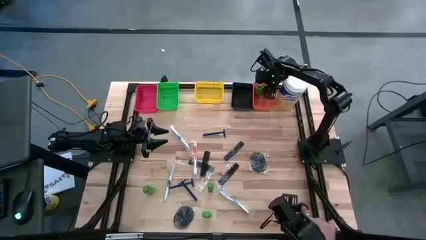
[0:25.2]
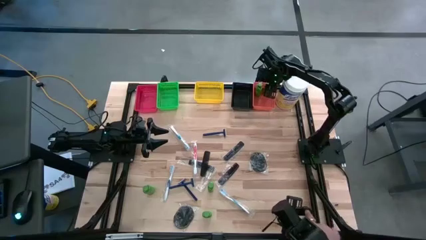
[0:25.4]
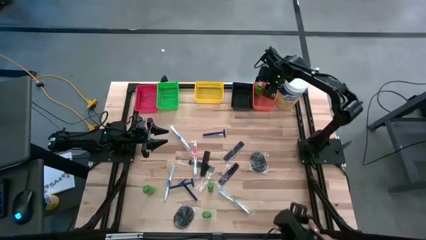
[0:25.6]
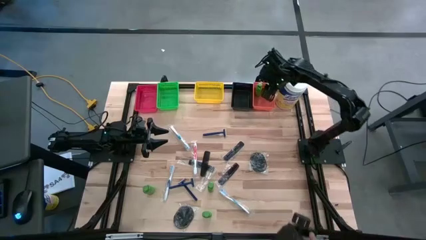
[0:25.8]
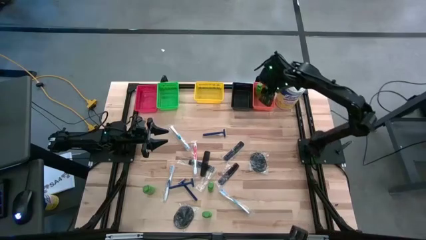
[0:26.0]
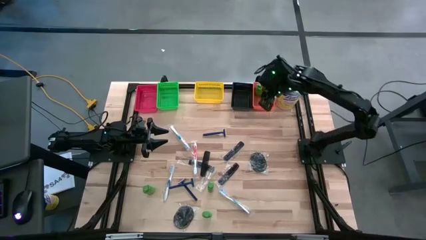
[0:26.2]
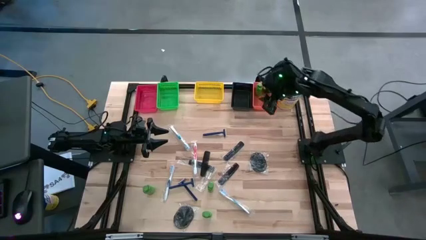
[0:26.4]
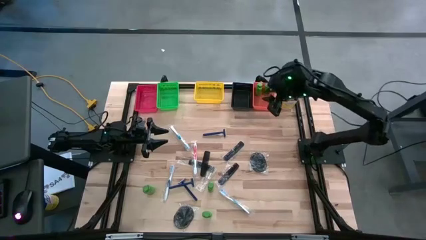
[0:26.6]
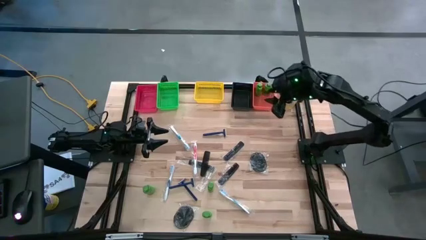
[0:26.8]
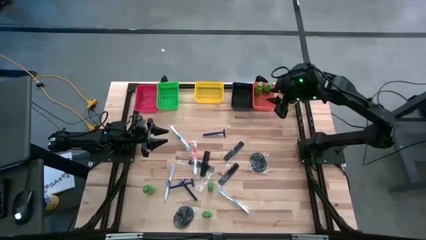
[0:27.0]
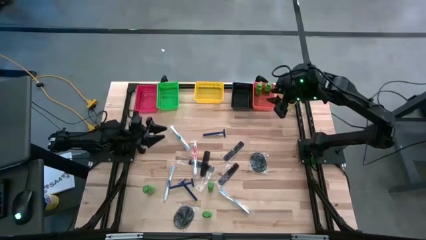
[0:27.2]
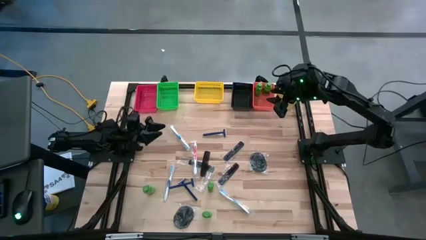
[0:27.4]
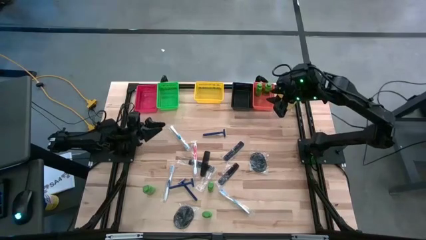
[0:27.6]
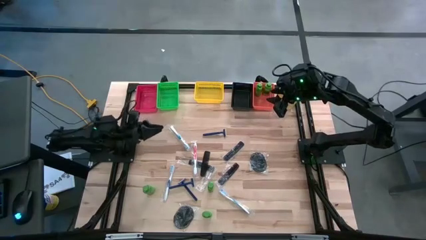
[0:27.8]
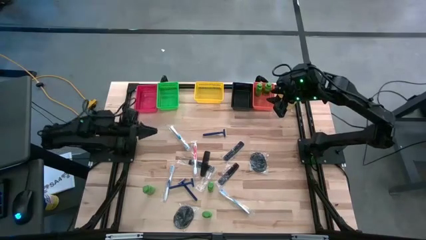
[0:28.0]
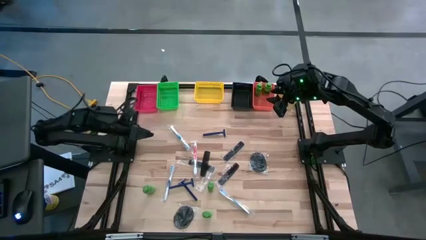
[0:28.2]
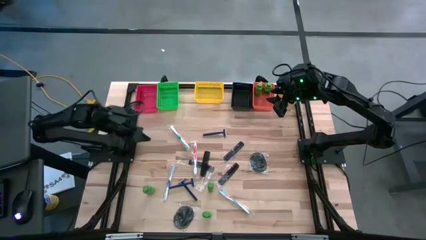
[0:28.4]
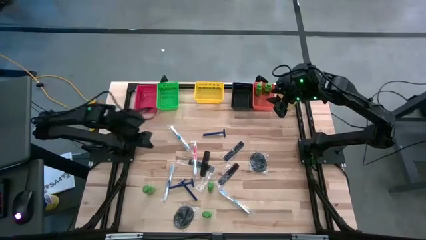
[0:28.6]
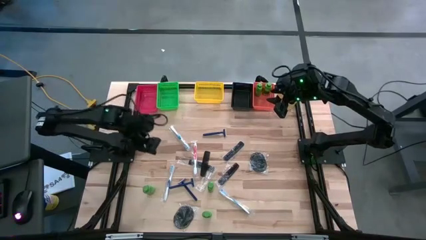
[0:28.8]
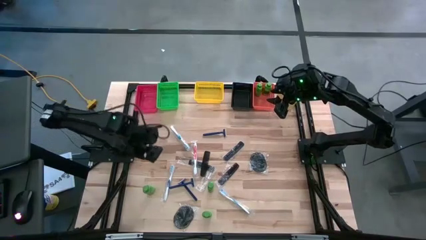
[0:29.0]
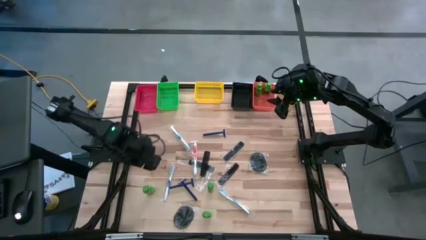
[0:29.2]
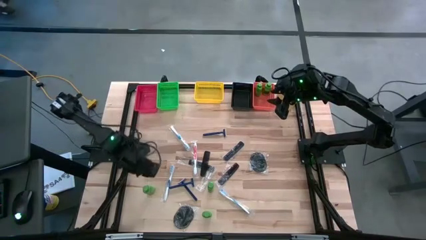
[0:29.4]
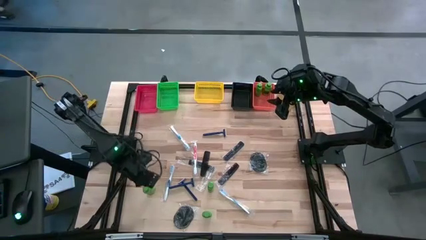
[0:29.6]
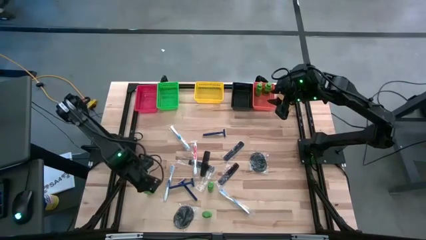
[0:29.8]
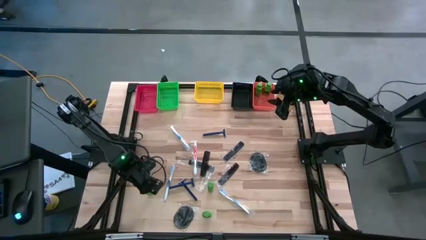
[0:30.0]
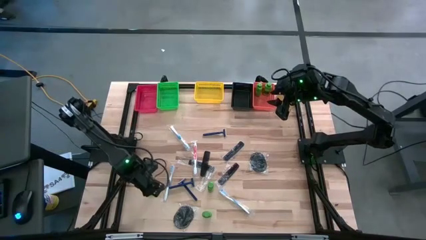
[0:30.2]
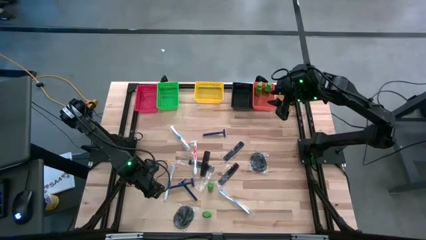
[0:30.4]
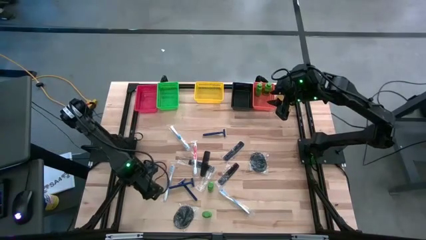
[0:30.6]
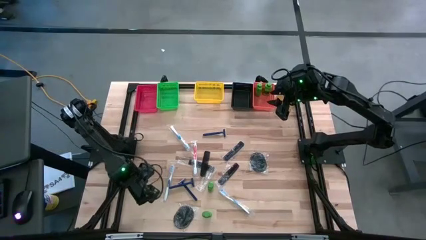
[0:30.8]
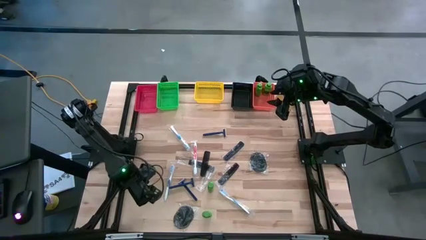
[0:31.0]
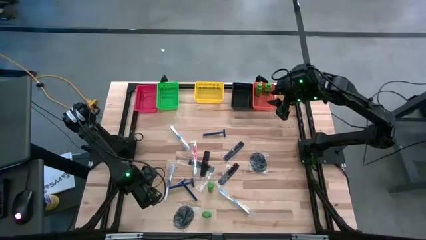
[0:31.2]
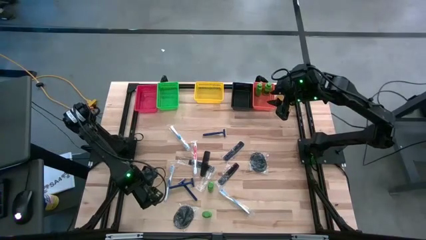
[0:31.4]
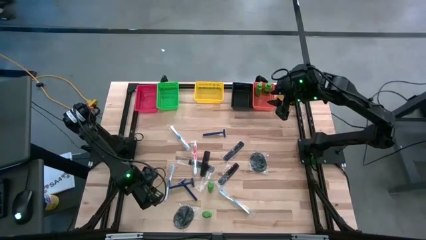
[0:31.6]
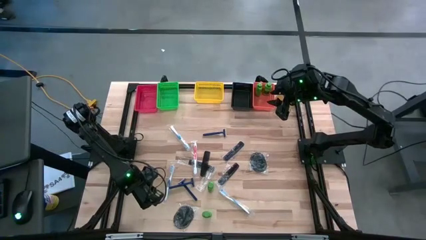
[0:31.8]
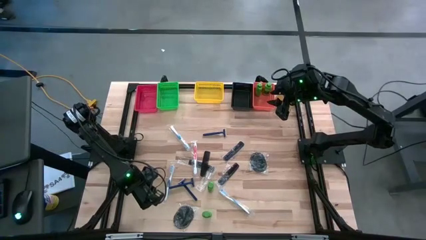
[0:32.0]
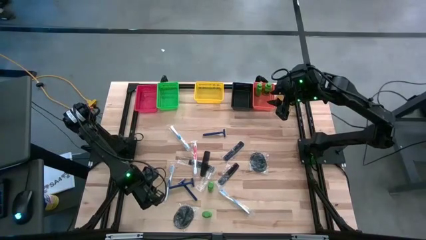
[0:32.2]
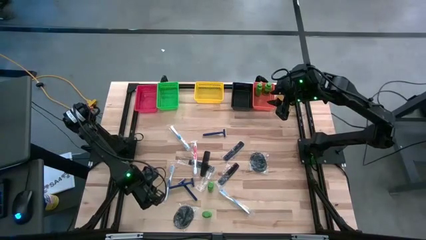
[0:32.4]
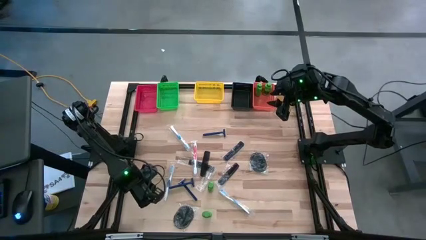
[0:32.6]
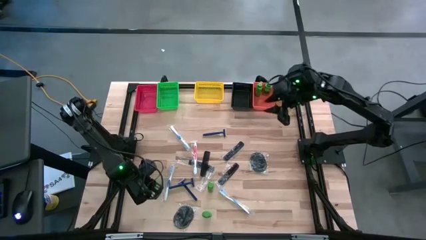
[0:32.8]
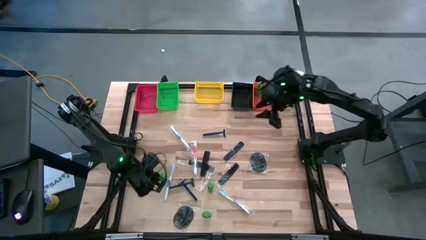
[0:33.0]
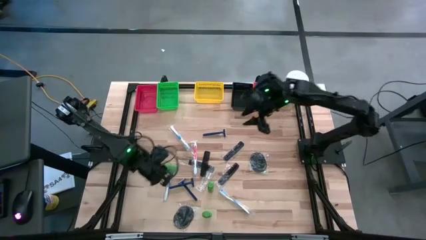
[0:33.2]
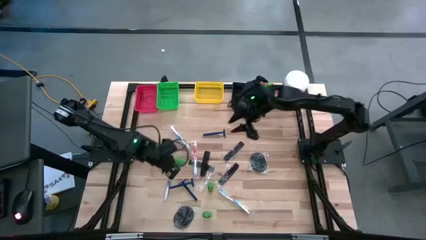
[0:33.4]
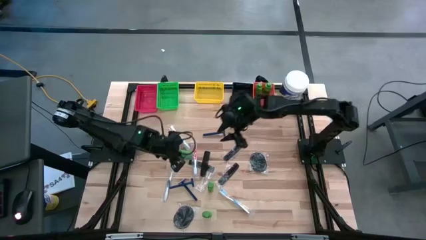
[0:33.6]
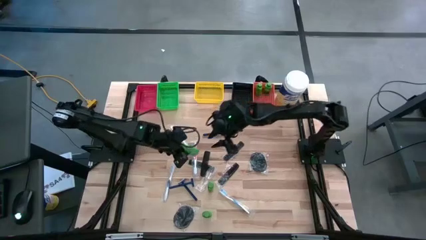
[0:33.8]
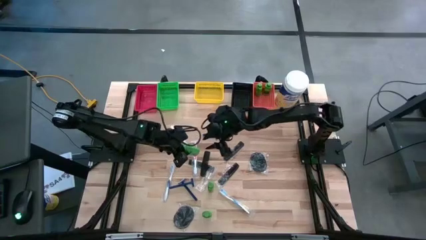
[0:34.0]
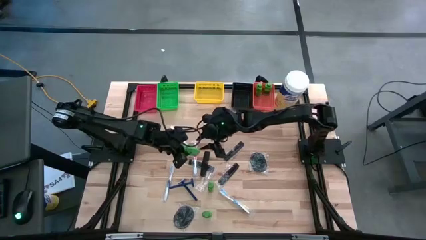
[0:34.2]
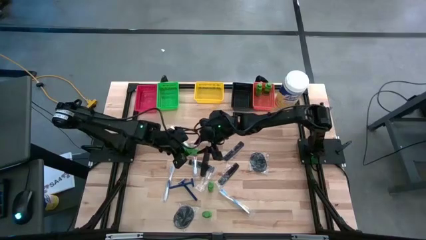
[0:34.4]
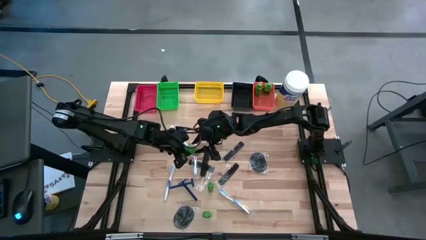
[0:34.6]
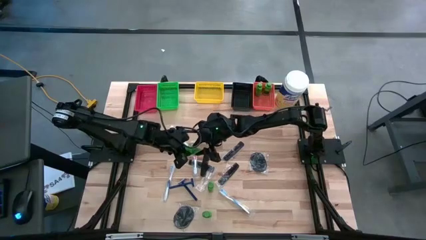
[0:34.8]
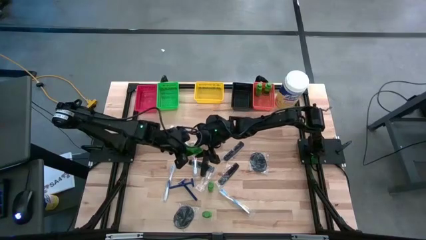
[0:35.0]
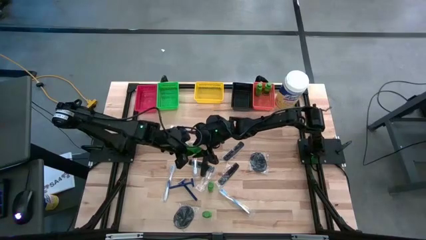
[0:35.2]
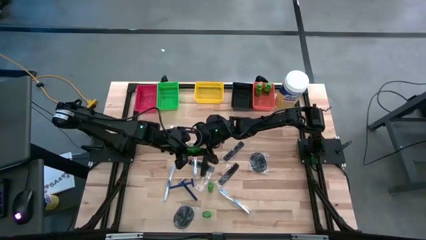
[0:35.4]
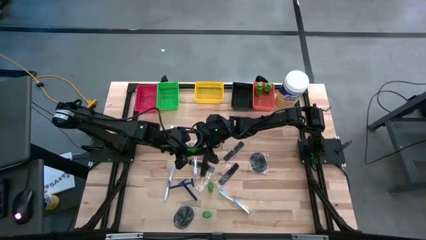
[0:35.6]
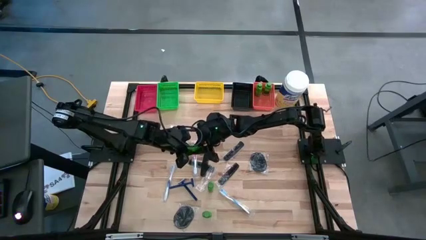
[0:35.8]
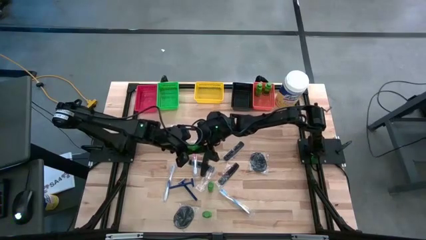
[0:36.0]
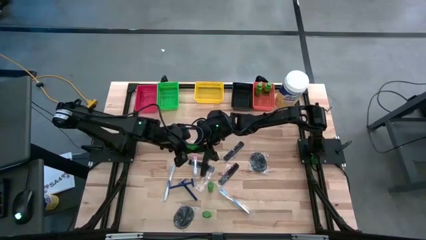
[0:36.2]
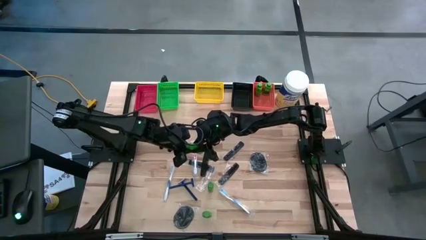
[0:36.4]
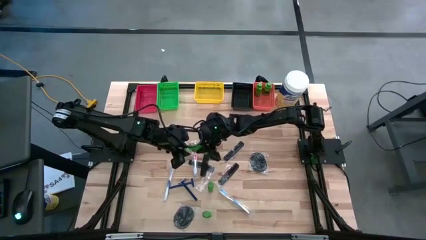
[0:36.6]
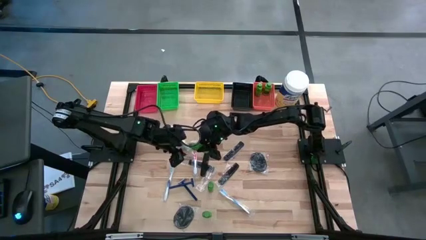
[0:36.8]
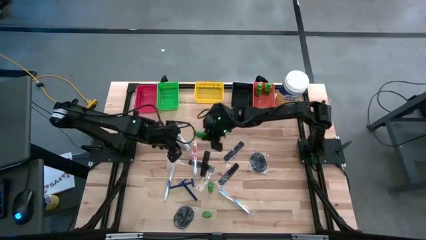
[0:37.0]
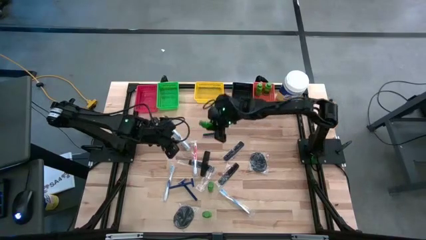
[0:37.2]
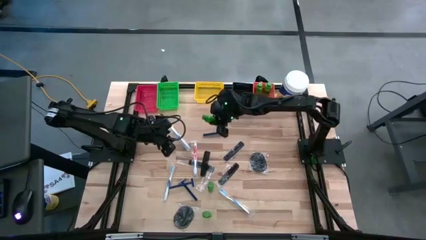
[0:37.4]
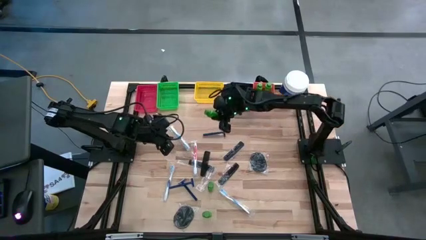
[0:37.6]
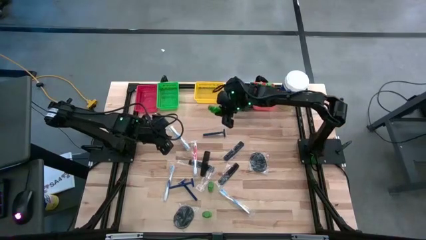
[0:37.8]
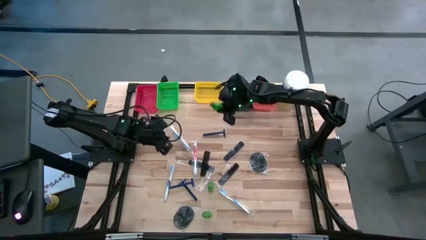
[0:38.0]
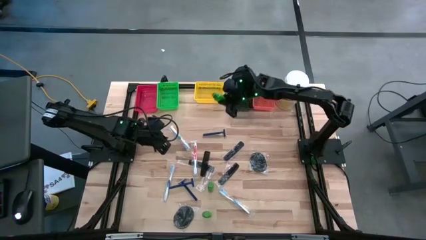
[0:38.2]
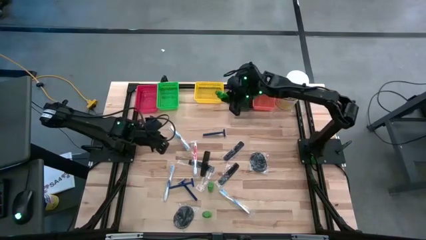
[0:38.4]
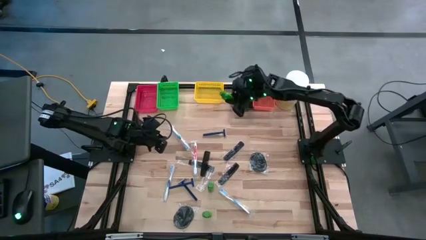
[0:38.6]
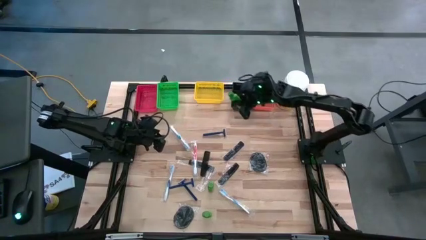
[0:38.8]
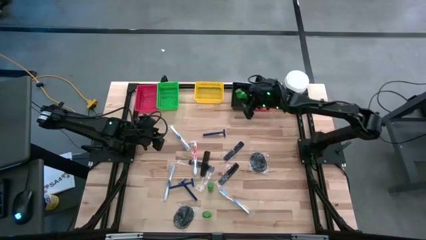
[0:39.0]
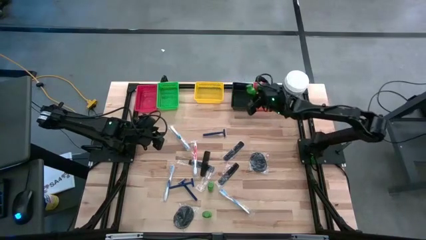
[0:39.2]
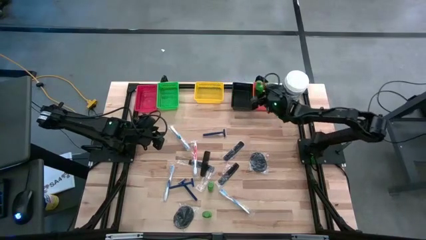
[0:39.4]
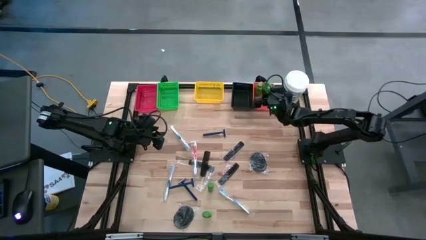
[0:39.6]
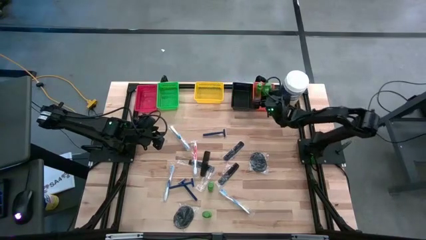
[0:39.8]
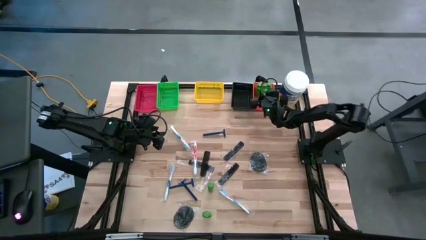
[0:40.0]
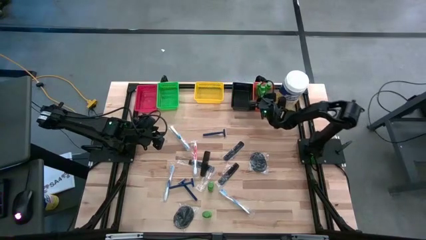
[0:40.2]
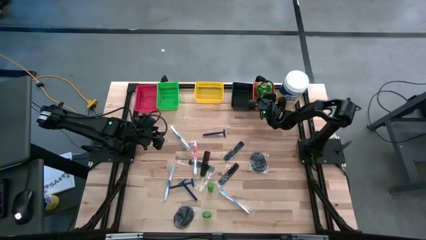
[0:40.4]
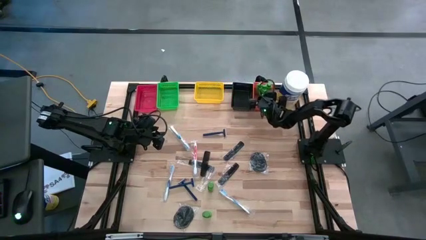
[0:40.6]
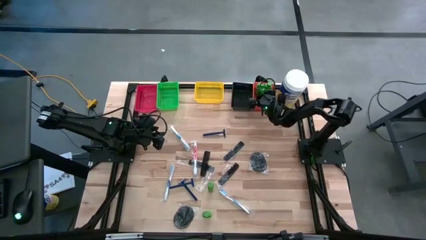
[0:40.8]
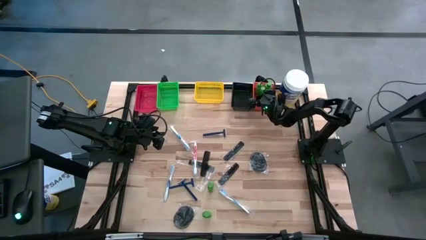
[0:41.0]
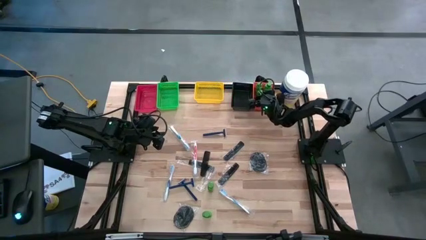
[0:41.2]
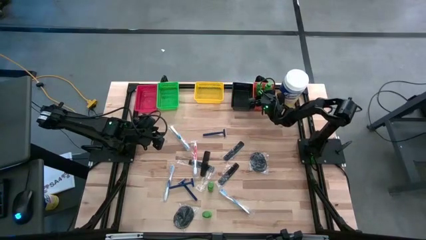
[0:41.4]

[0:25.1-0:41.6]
Task: Pick & Place Travel size toiletries
Put the green shampoo bottle into the orange bin
